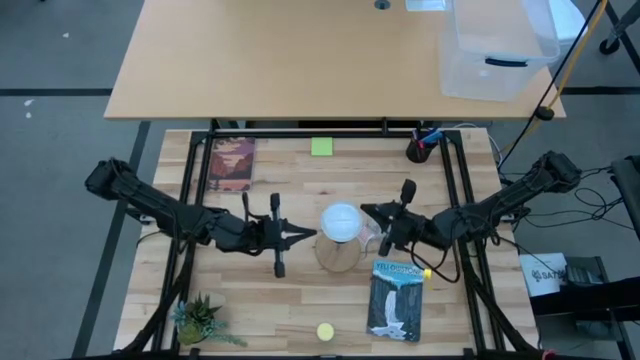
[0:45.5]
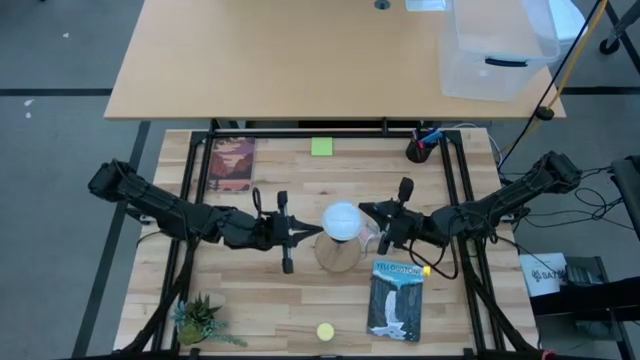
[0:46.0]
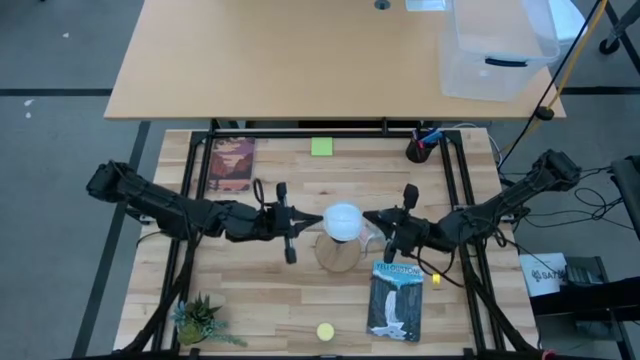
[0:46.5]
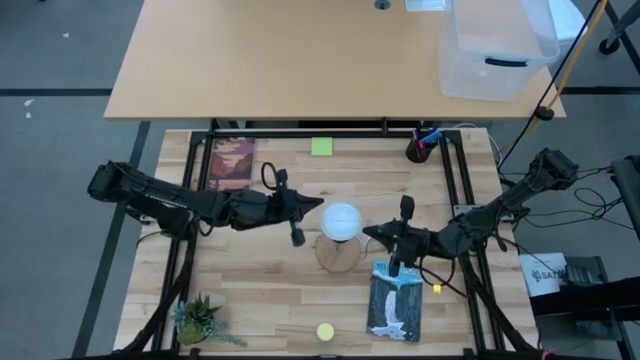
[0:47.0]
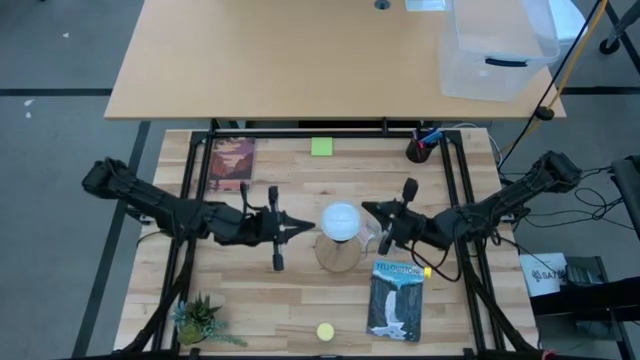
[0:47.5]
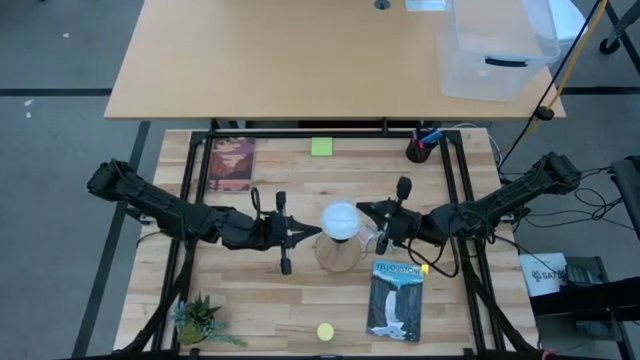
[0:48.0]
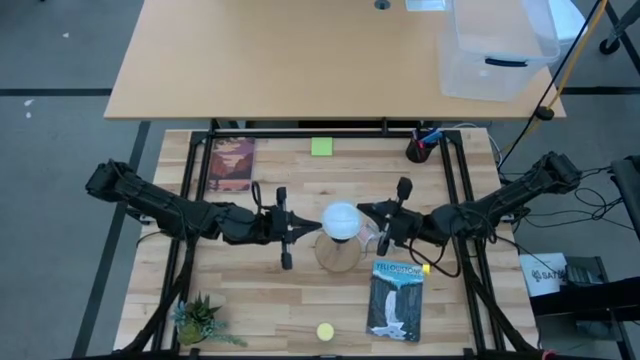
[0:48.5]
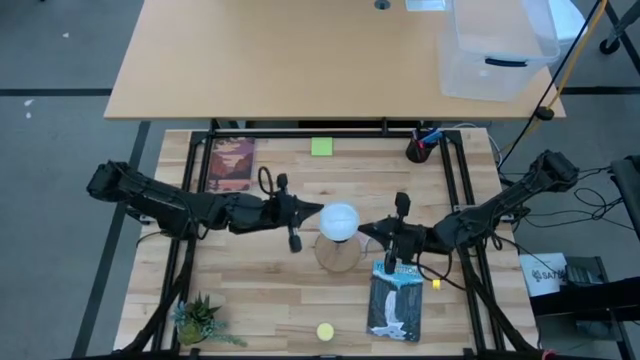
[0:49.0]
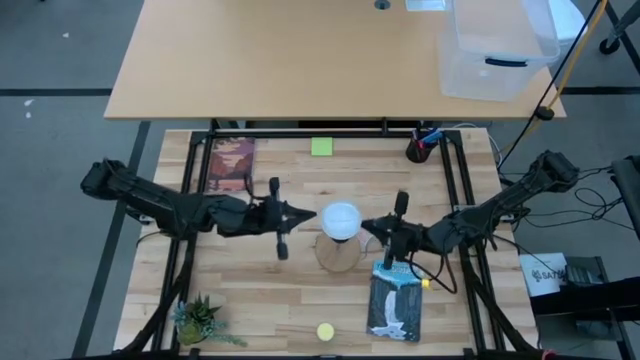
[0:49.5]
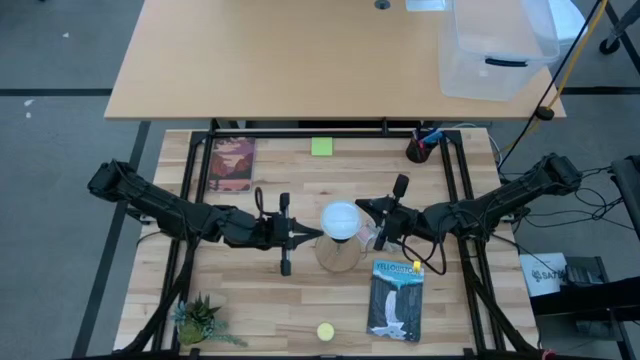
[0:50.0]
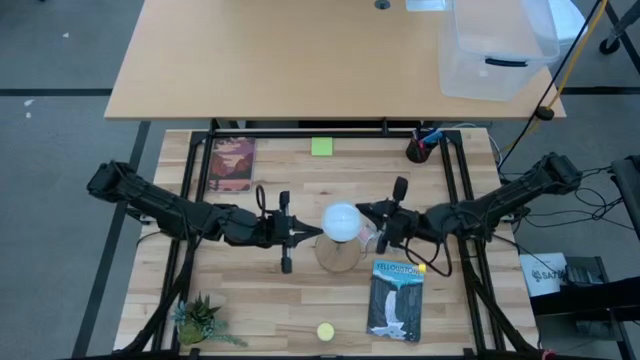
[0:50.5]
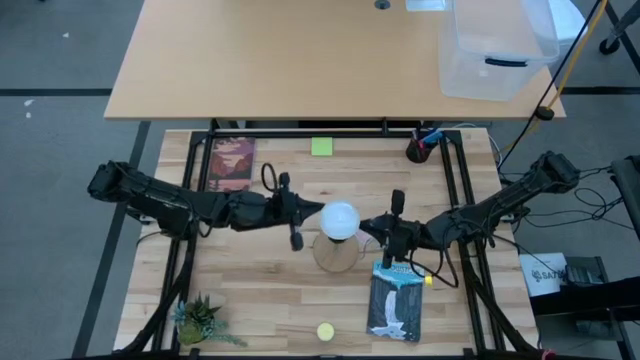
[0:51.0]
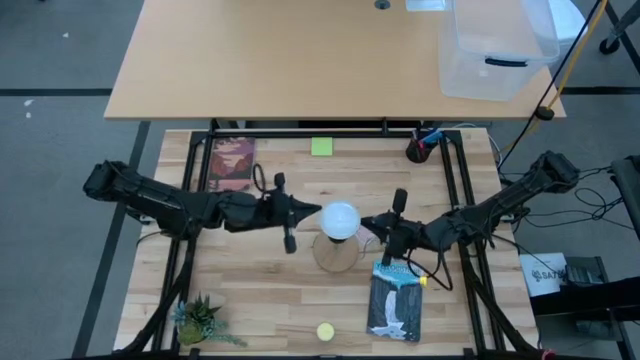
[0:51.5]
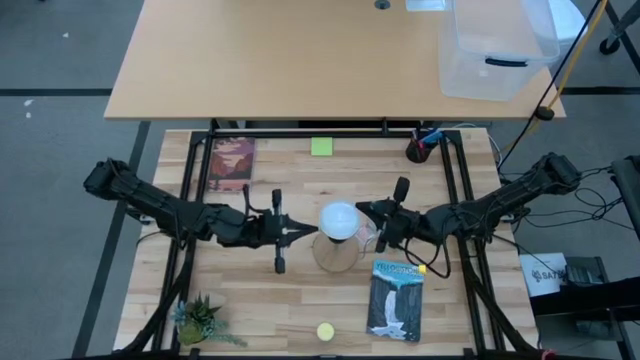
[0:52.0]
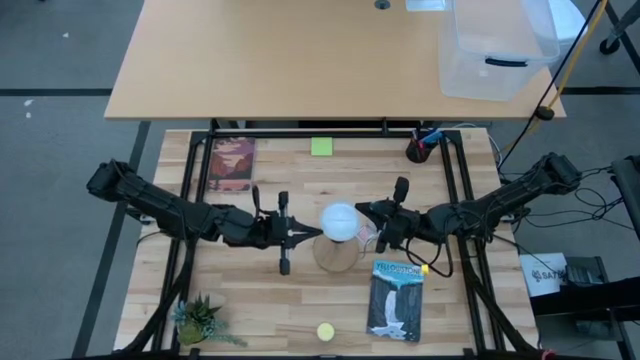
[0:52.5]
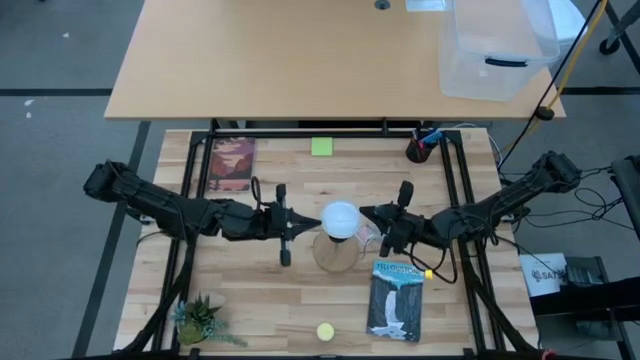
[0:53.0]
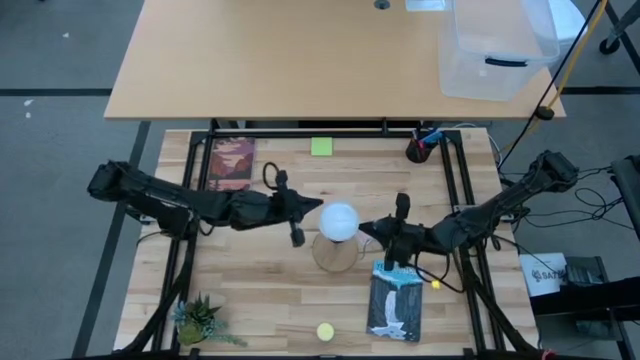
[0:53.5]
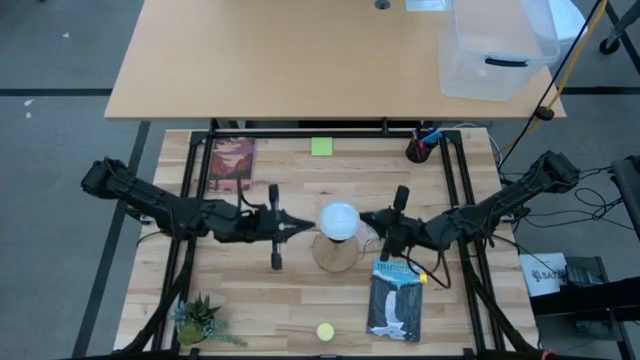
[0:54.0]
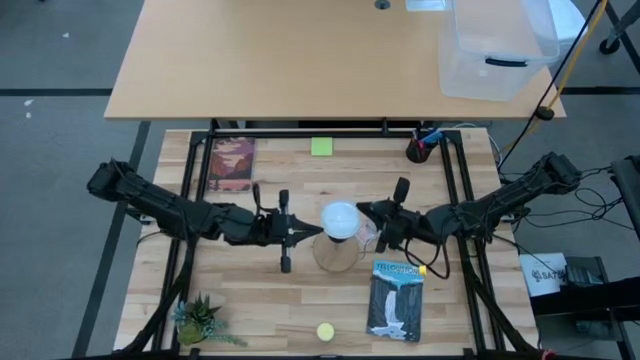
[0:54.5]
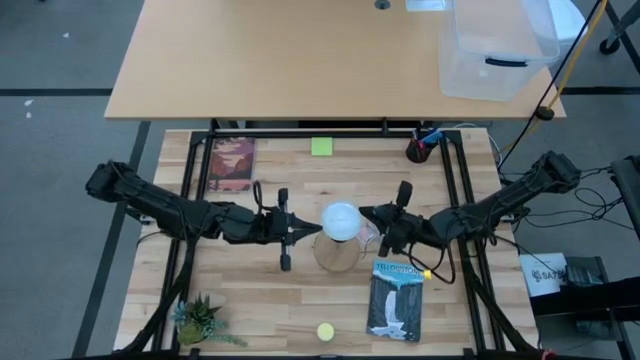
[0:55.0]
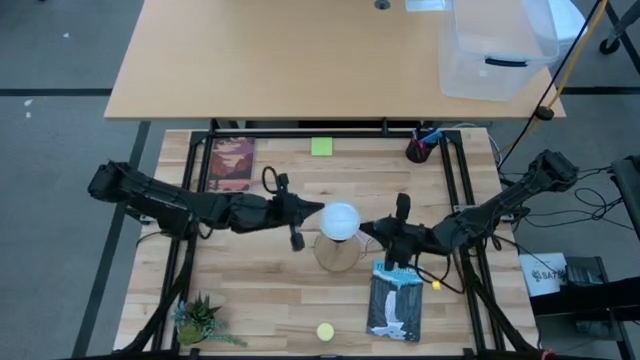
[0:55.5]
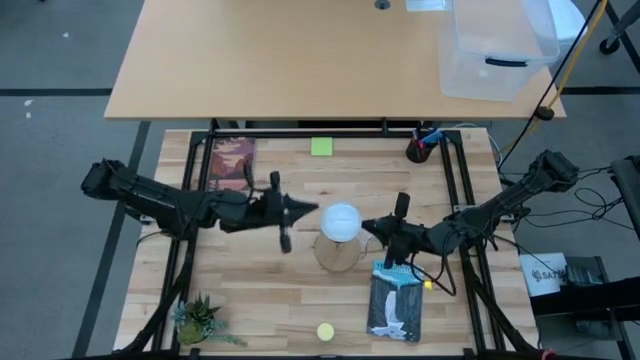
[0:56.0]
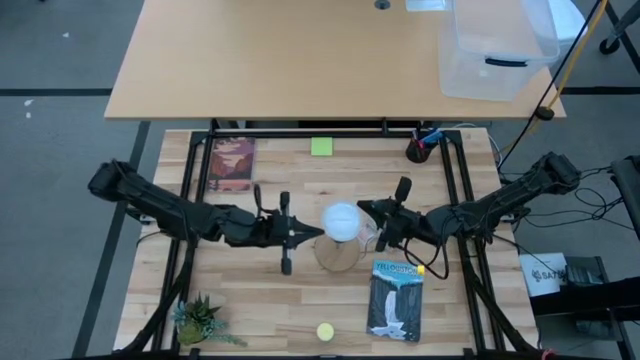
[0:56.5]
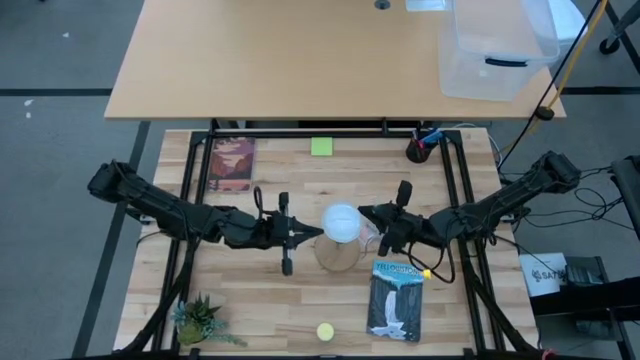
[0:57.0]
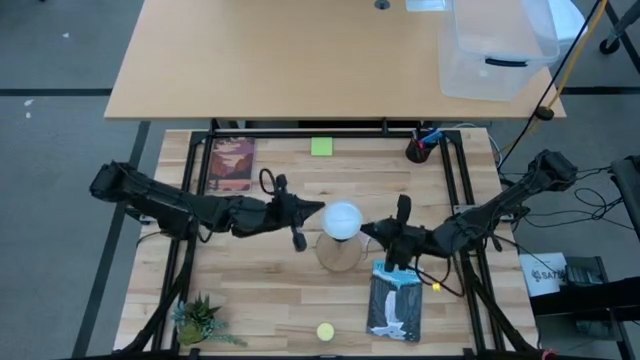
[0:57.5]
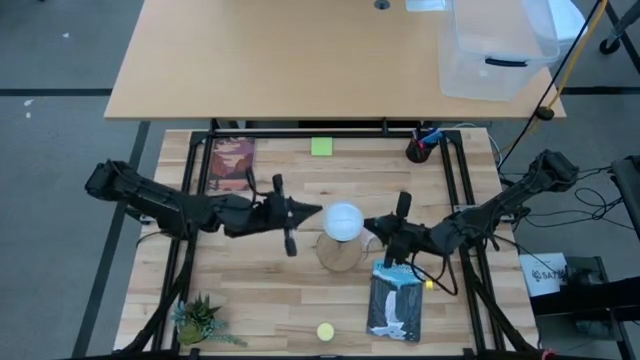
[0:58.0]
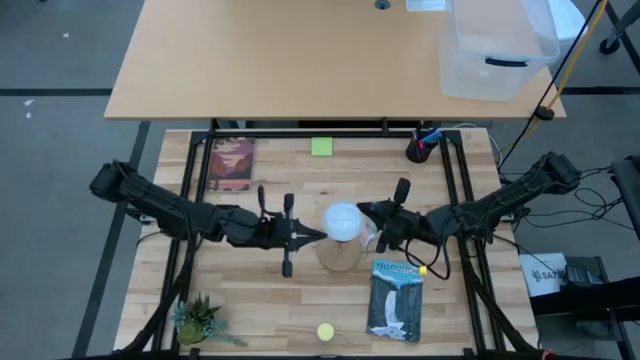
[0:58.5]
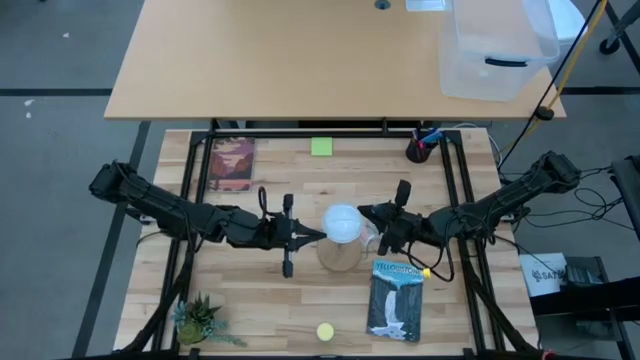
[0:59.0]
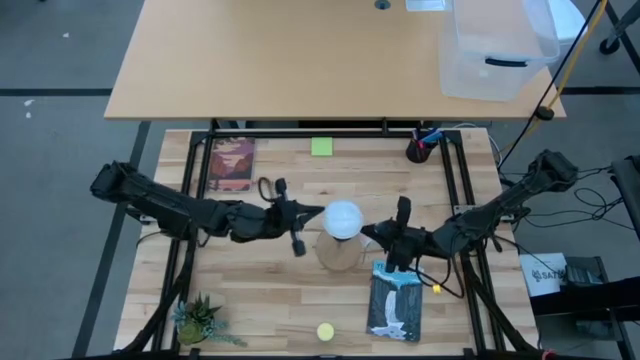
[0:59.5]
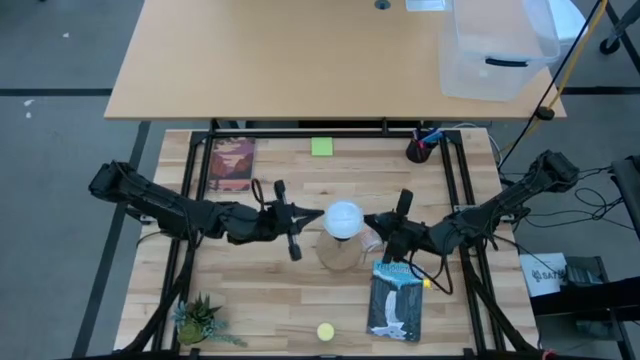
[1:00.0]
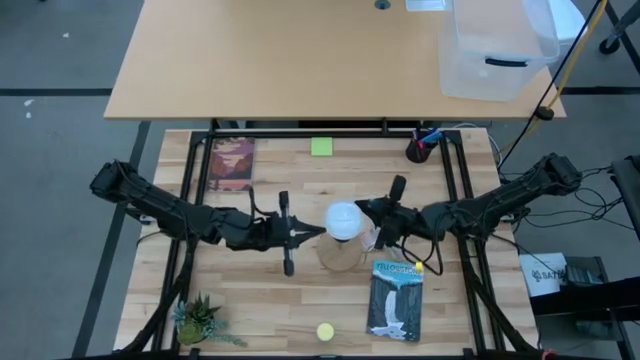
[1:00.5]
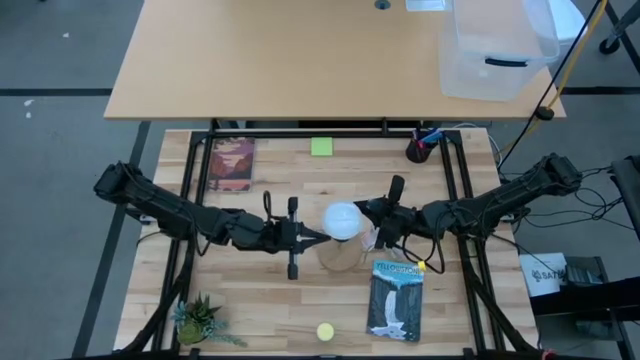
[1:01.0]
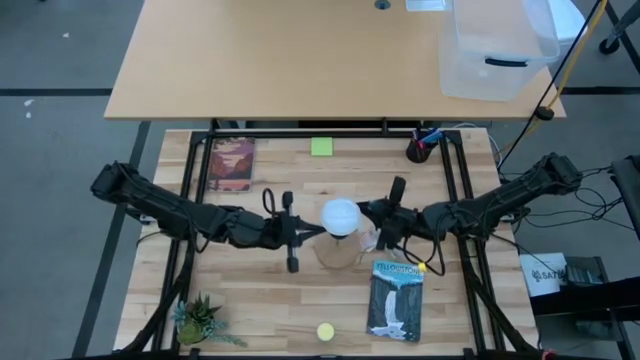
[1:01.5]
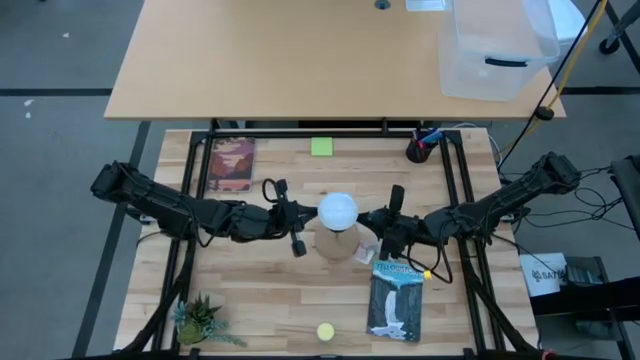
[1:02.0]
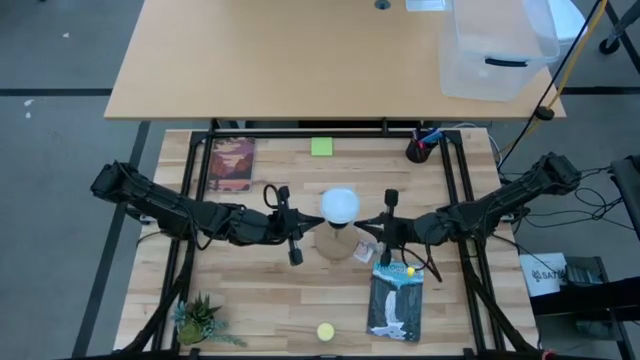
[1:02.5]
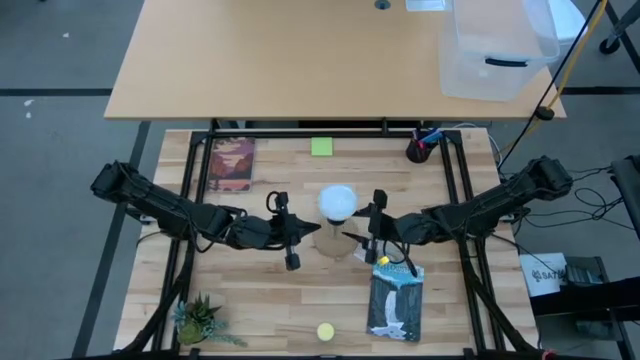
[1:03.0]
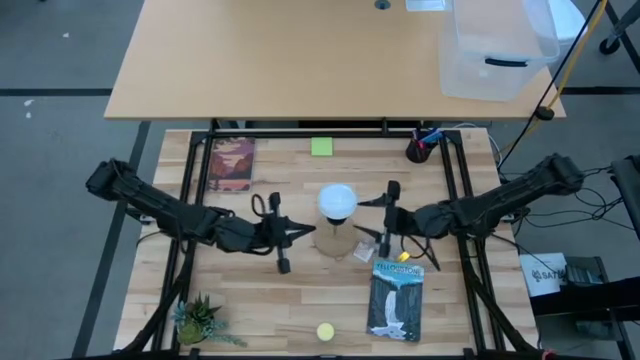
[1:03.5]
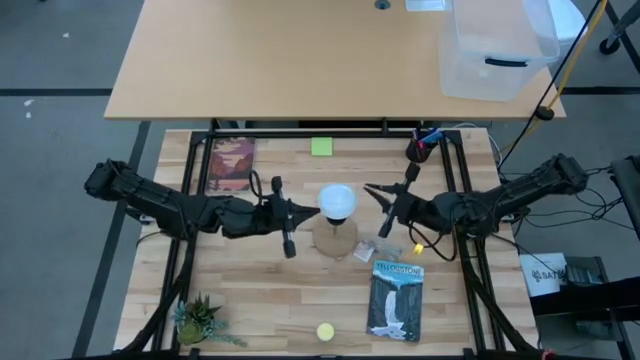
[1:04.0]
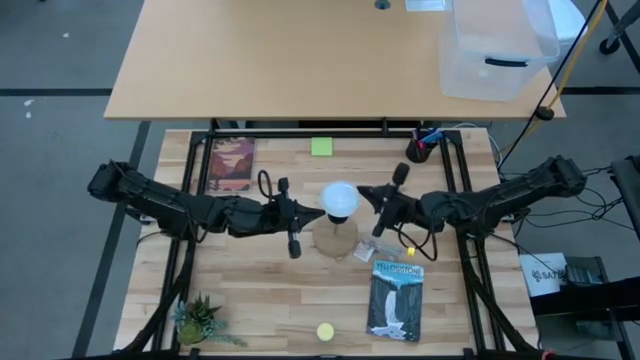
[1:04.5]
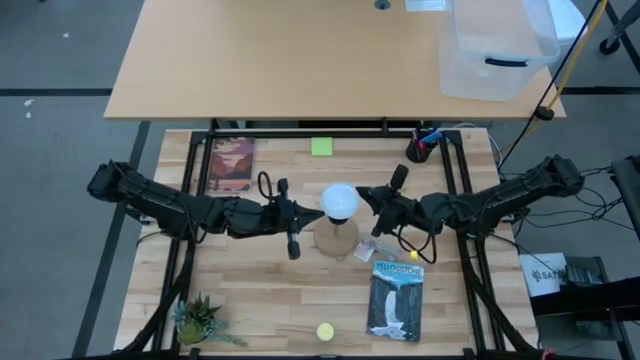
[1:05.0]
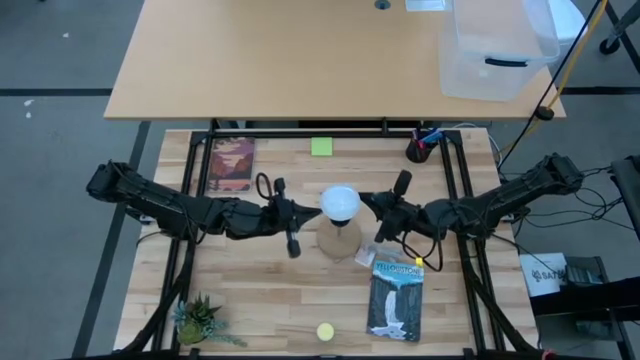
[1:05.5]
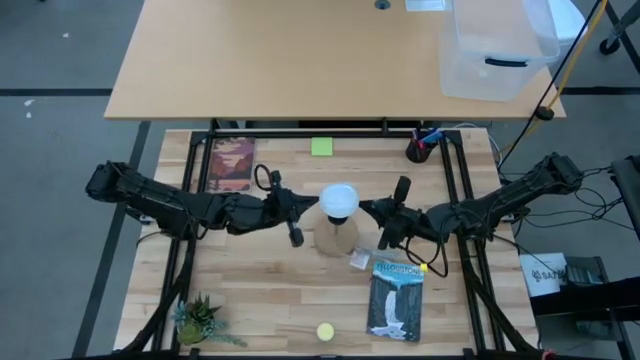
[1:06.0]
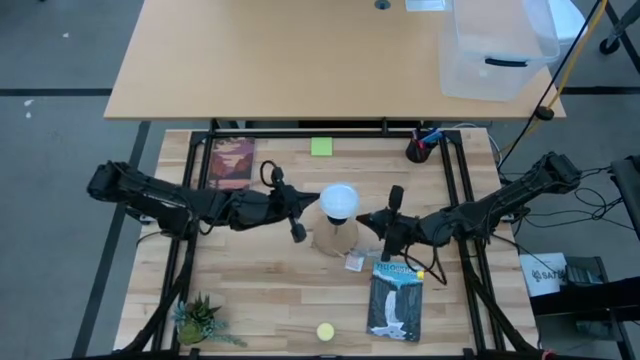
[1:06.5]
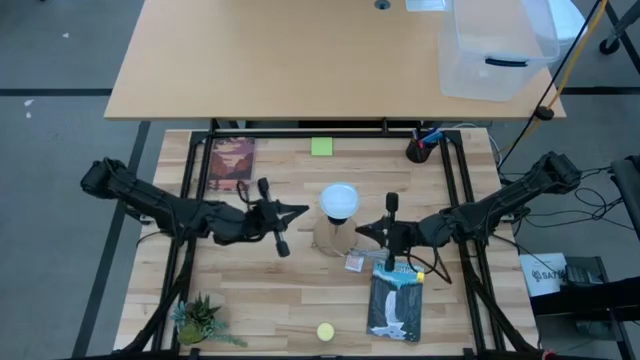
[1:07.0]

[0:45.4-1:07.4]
Task: Screw lightbulb
Insert the white lightbulb into the brown lamp
